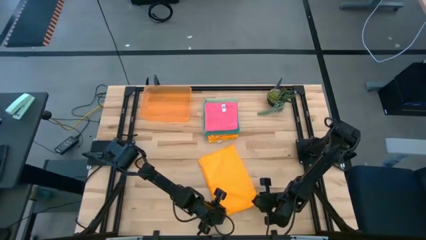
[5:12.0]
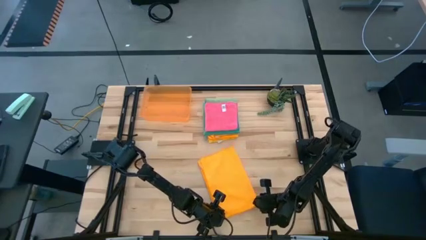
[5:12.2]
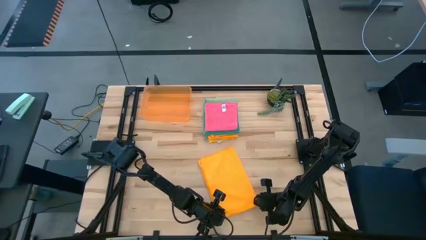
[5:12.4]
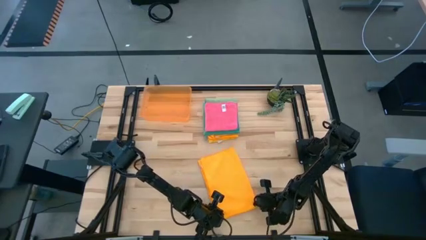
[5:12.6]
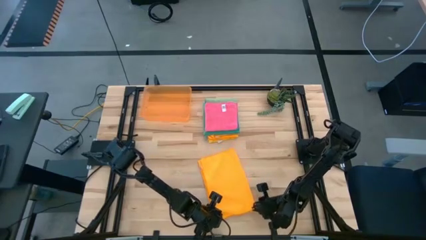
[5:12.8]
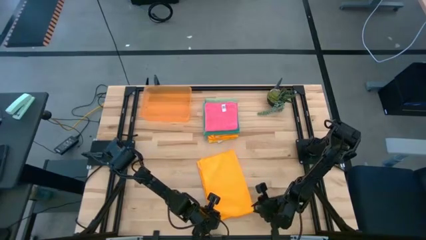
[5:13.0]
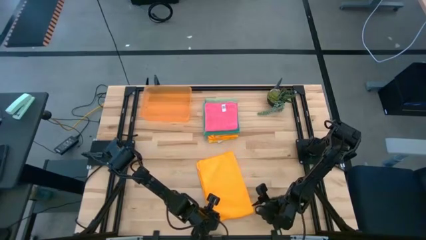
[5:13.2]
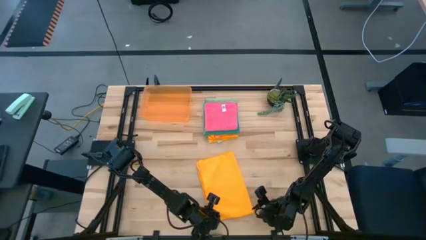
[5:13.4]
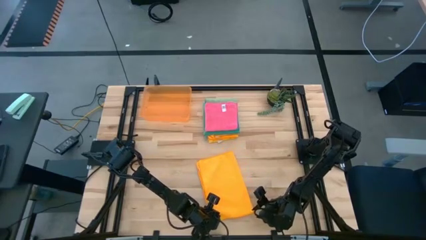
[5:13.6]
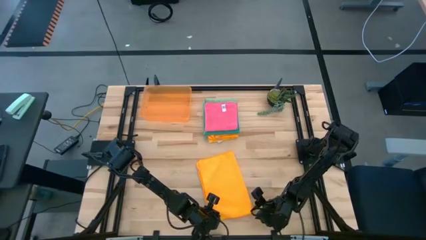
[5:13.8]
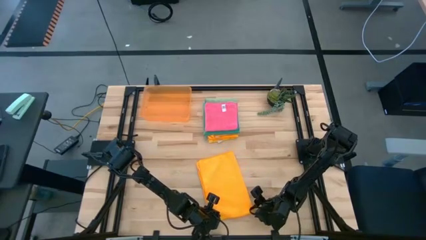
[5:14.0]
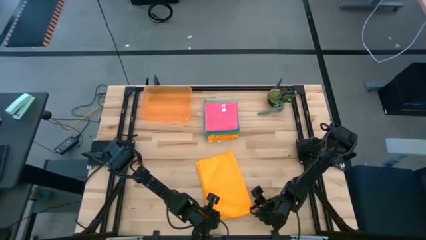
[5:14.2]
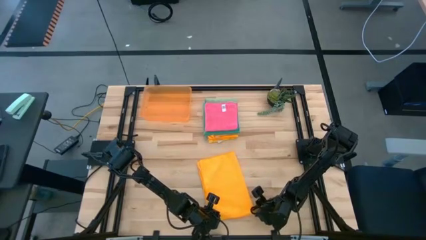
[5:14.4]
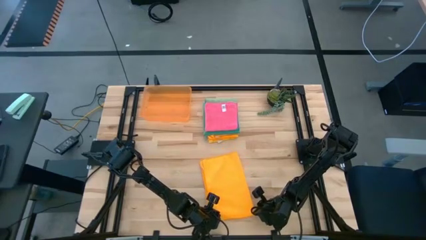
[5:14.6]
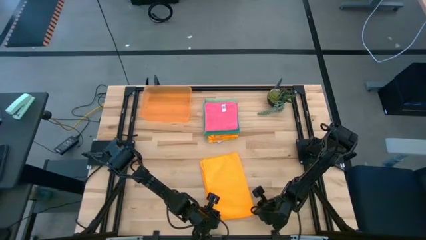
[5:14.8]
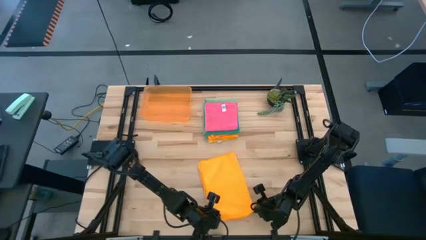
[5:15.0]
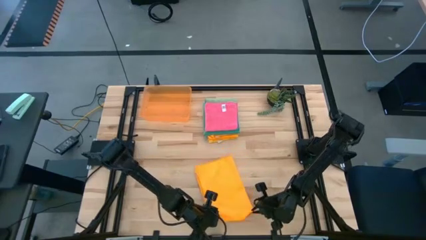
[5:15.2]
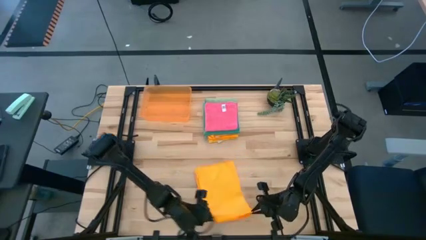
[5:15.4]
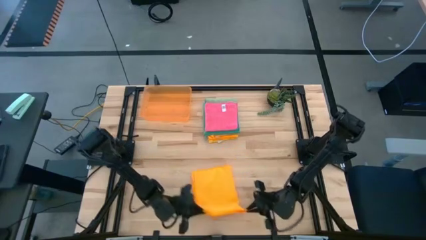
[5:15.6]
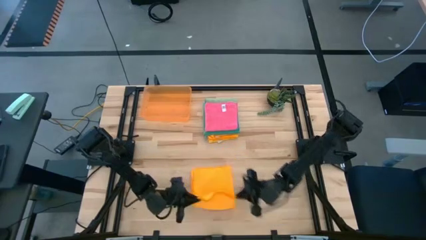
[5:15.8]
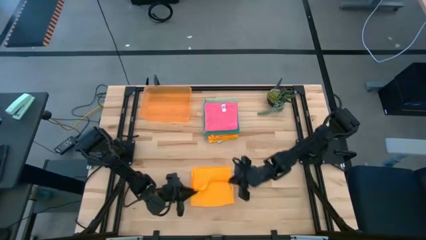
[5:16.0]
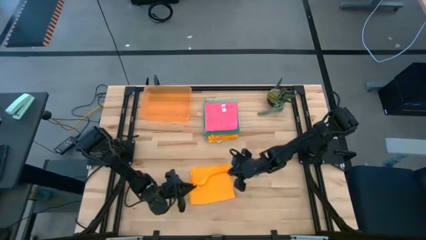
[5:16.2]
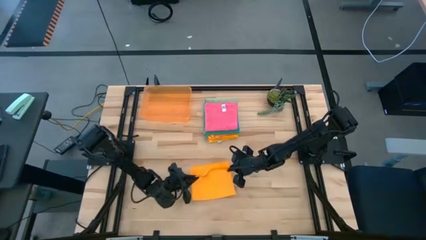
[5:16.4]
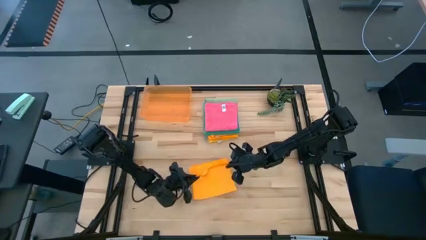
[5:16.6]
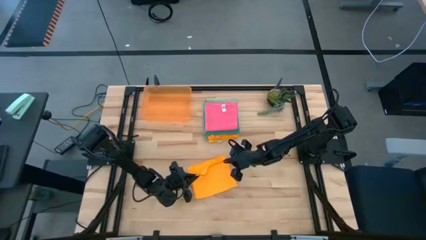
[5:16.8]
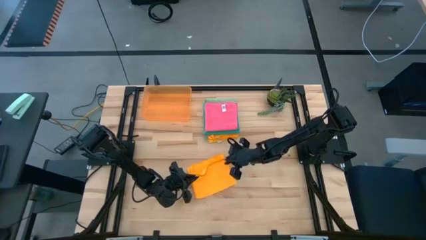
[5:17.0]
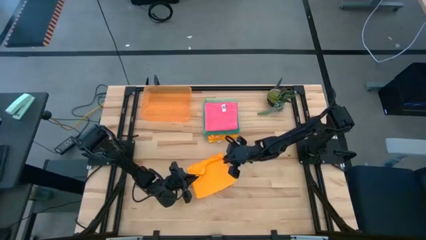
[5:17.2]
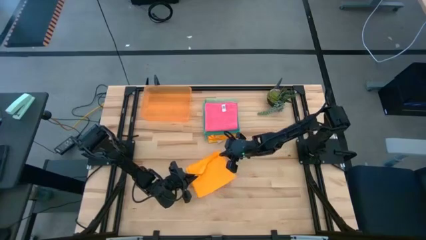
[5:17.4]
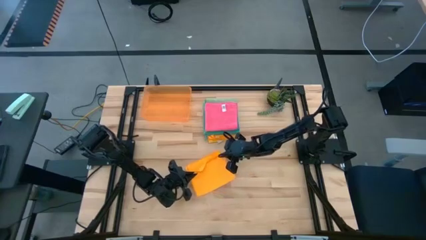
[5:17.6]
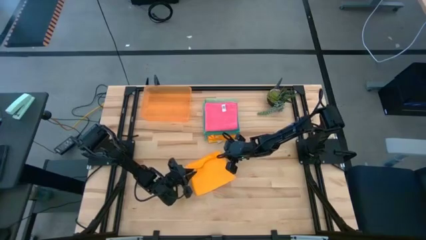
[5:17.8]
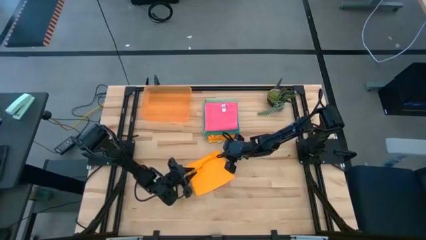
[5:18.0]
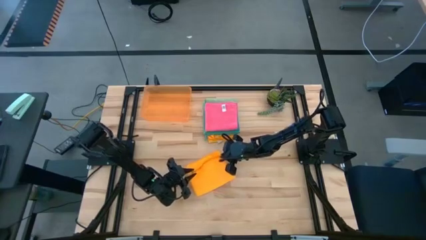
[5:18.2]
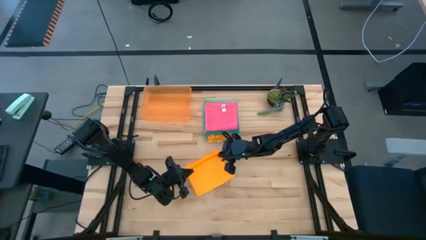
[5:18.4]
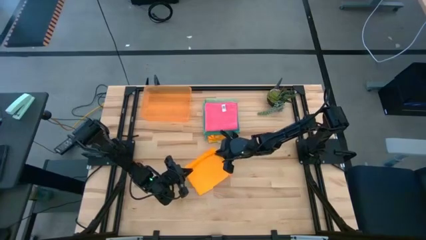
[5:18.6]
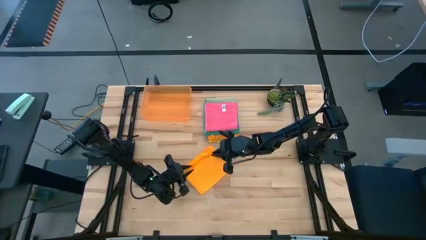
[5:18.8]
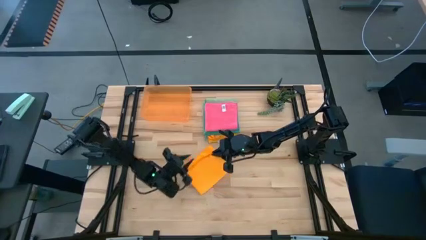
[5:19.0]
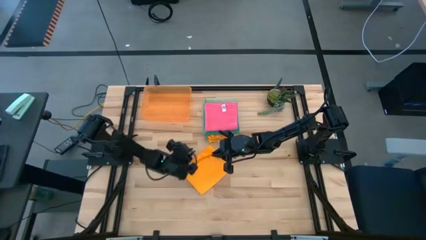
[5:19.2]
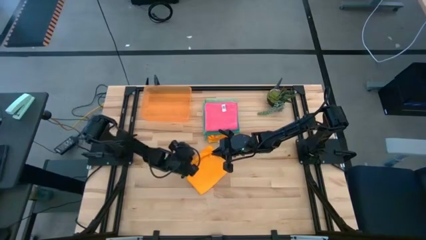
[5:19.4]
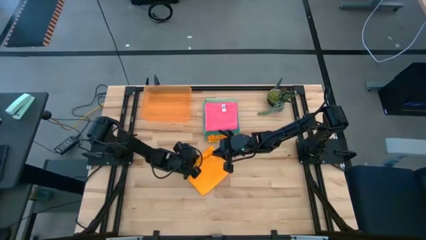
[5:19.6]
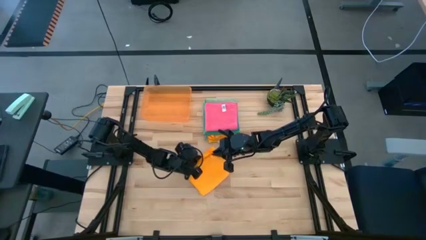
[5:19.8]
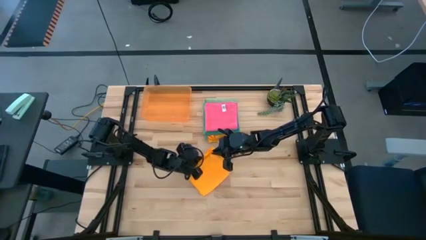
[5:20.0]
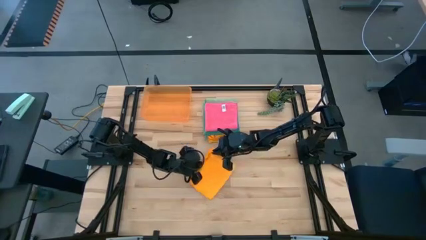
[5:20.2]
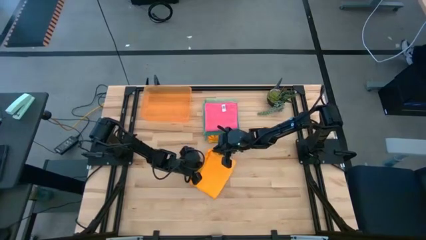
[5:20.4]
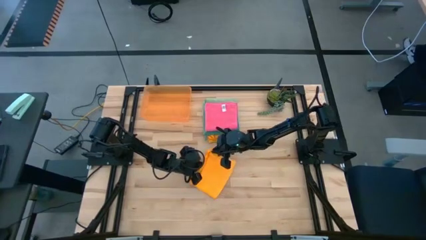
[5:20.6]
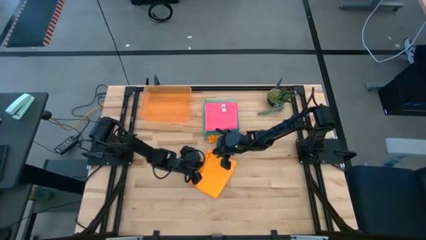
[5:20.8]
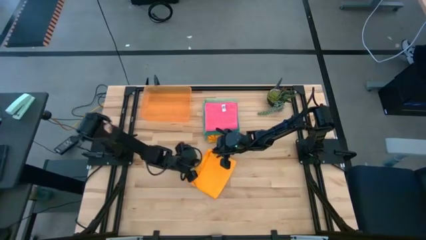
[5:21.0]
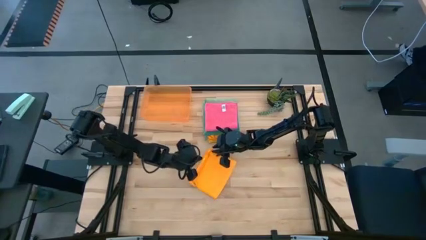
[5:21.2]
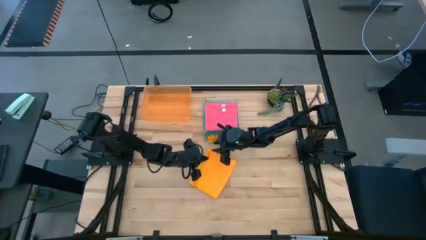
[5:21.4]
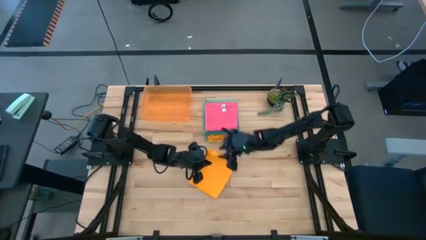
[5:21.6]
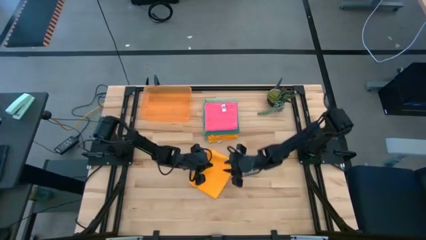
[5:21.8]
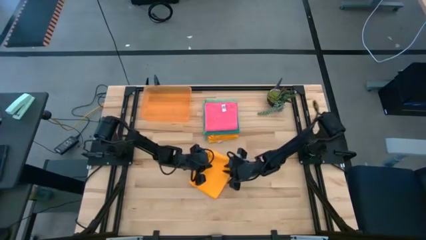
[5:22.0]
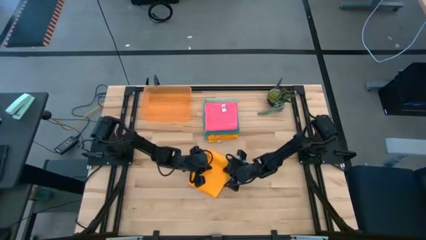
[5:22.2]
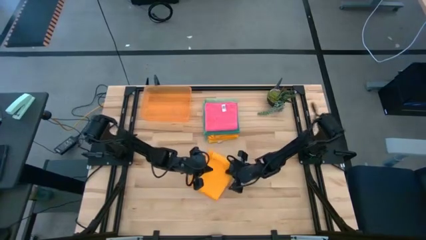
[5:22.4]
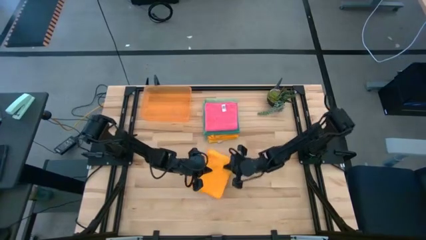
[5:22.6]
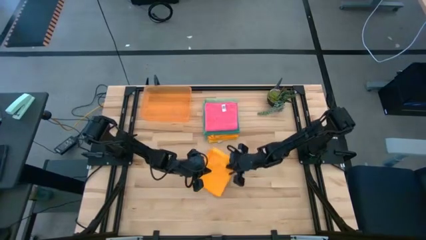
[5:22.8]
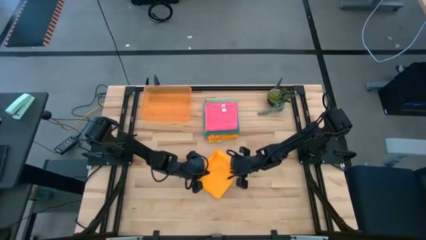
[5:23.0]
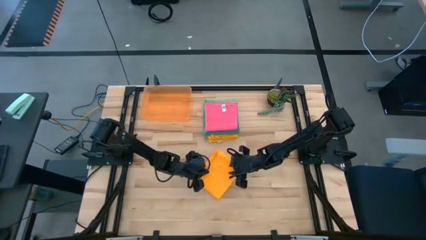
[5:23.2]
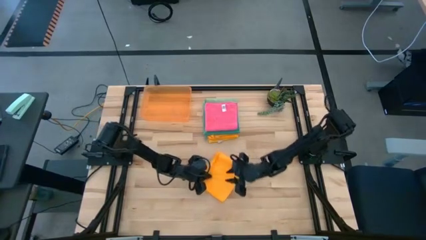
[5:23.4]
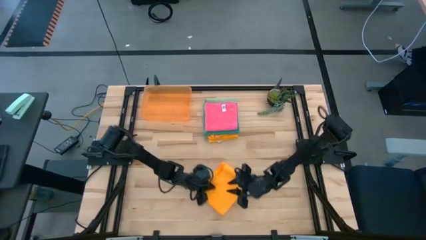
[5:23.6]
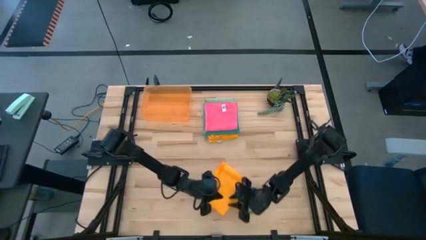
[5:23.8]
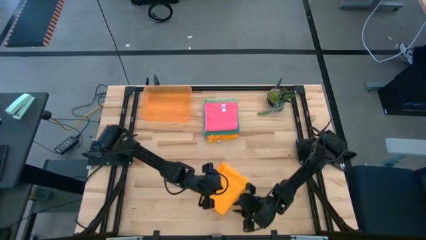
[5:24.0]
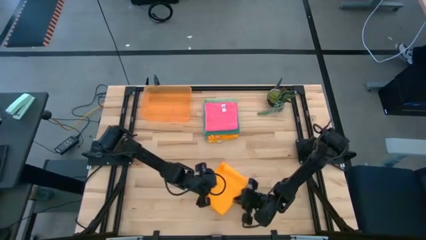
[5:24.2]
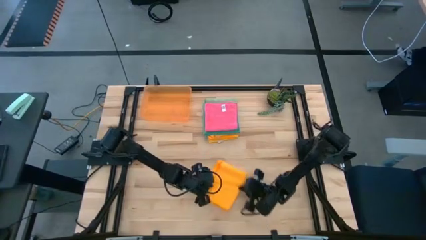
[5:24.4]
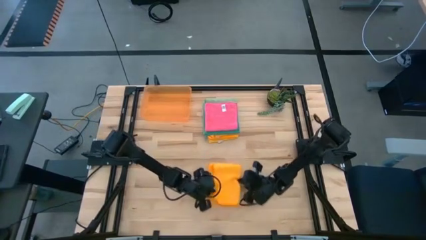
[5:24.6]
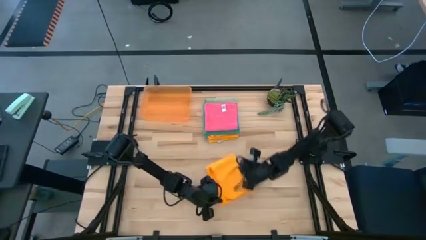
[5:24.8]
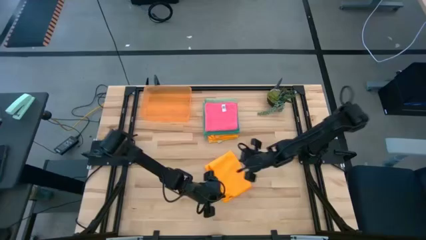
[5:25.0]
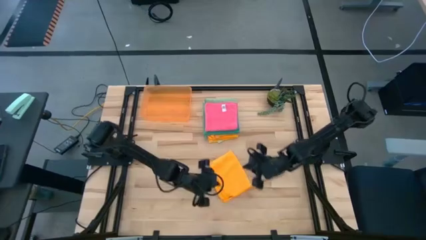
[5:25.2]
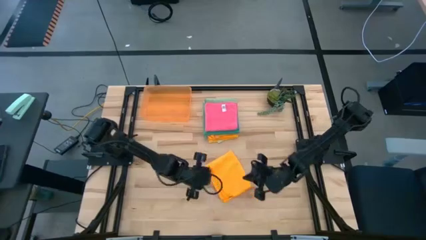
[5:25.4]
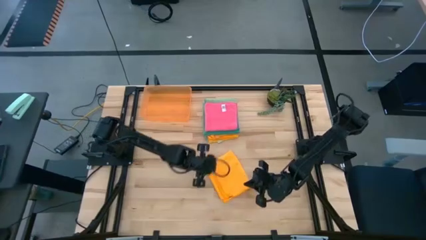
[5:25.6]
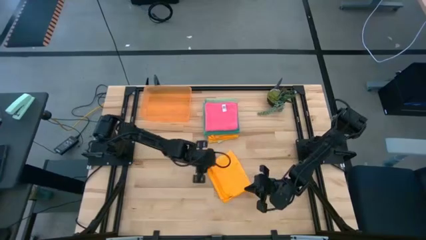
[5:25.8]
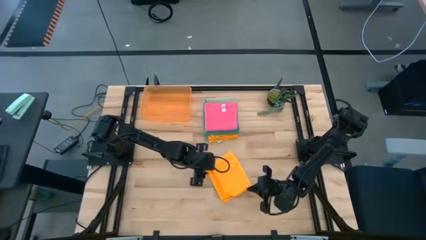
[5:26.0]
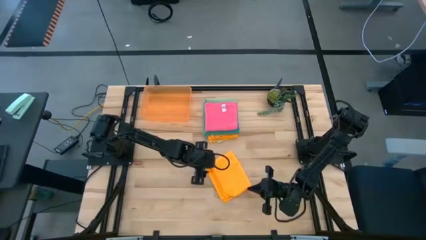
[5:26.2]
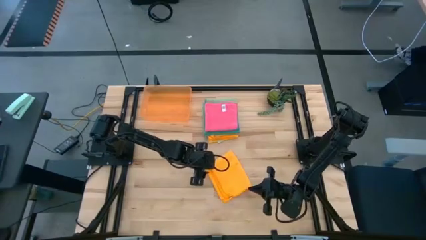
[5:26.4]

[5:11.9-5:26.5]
Task: Fold microfiber towels
Fold the orange towel

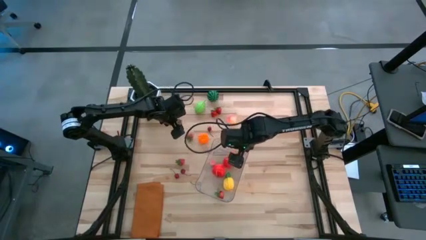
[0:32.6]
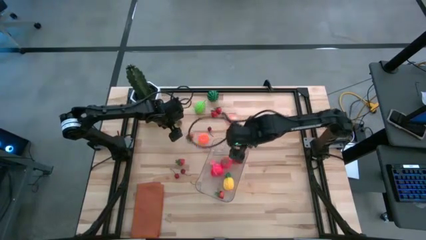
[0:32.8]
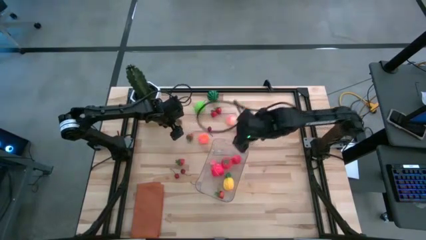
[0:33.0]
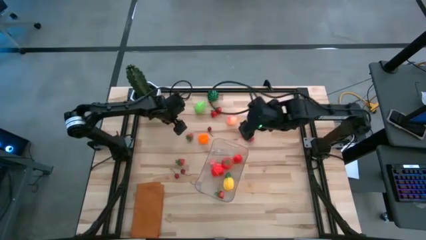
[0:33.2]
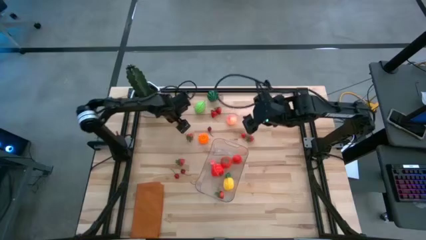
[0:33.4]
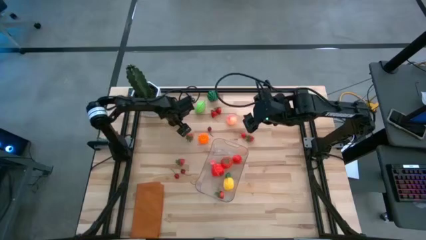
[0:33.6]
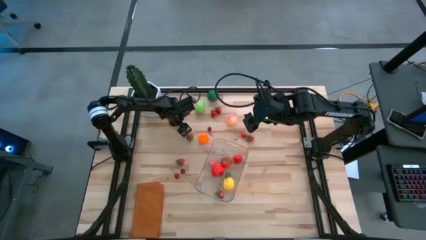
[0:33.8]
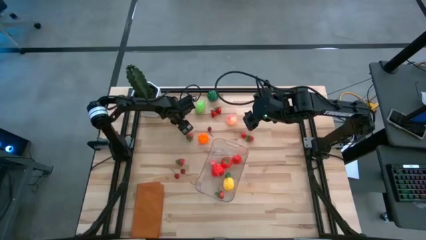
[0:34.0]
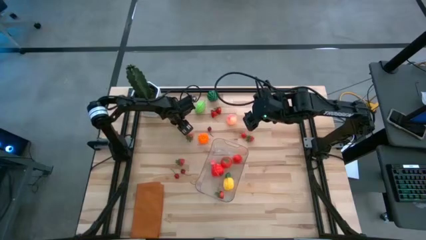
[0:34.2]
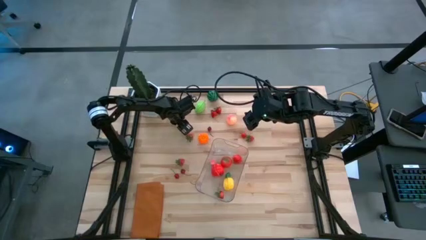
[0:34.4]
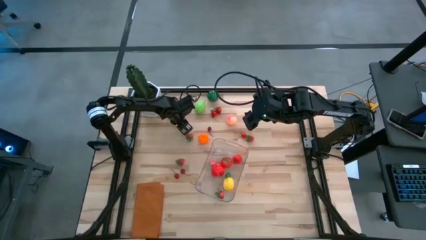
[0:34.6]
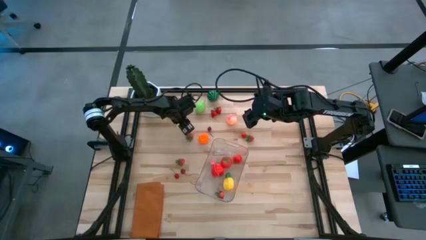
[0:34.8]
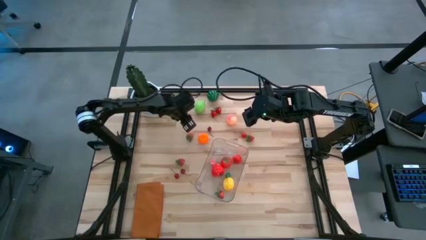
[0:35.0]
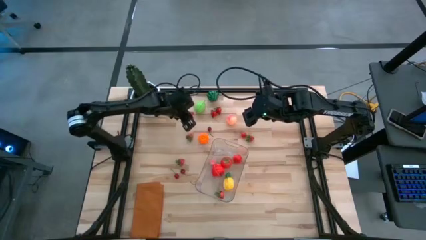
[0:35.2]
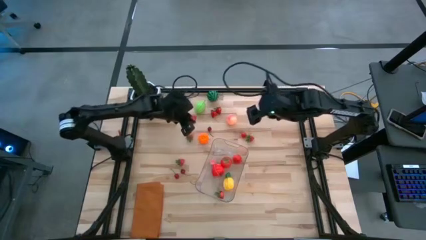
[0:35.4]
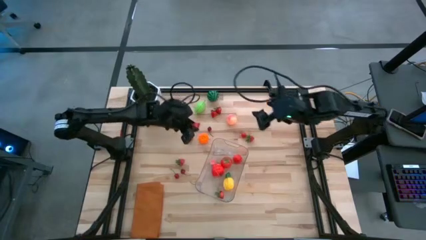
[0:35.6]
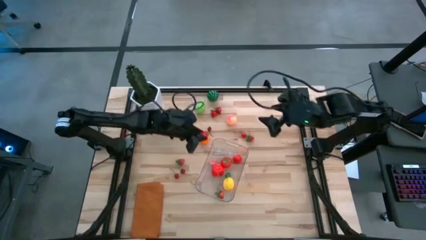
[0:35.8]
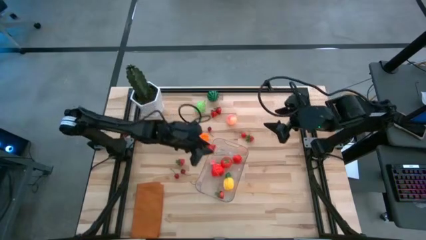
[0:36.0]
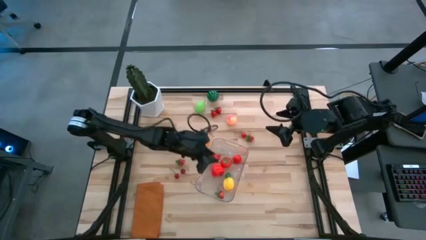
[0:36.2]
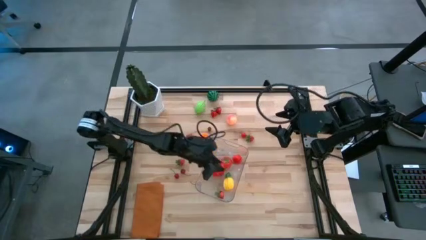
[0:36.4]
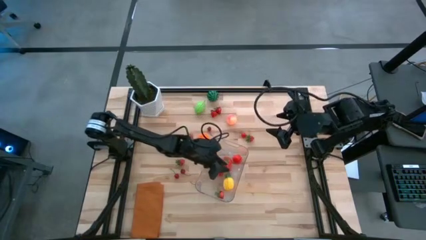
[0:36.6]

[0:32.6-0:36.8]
Task: Pick and placing Produce into tupperware
Put the red strawberry into the transparent bin
